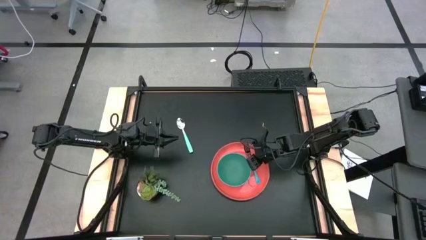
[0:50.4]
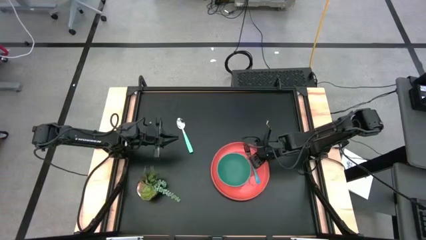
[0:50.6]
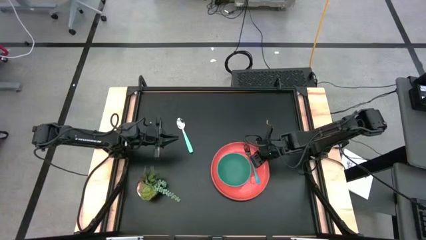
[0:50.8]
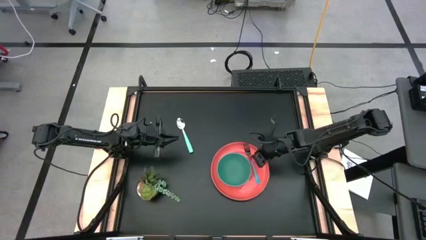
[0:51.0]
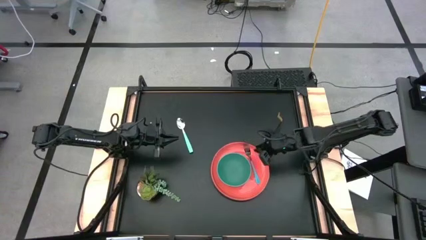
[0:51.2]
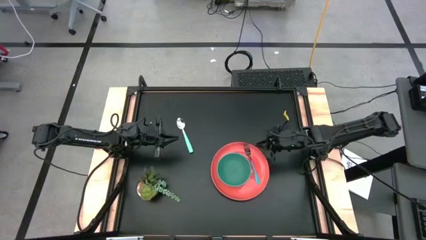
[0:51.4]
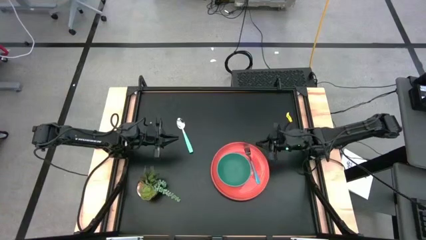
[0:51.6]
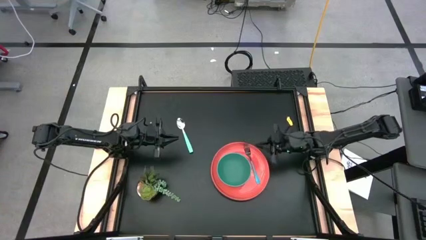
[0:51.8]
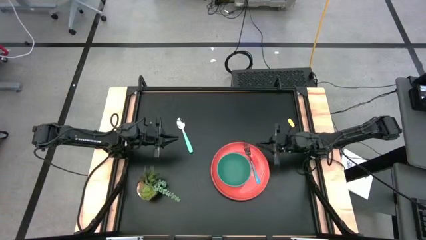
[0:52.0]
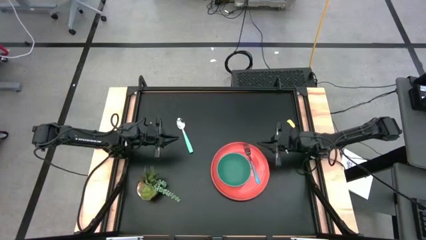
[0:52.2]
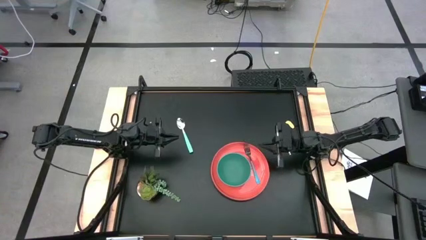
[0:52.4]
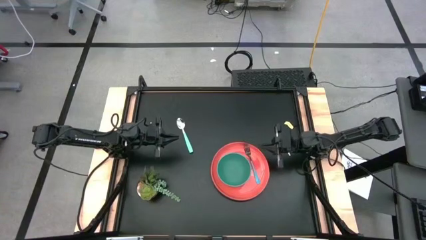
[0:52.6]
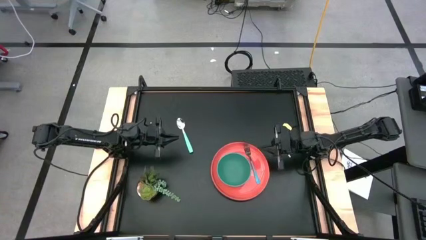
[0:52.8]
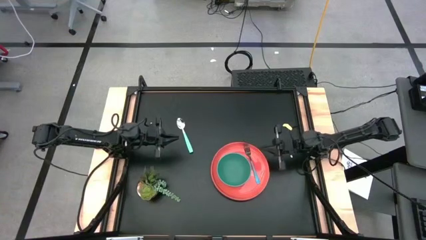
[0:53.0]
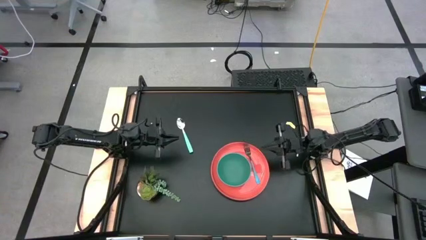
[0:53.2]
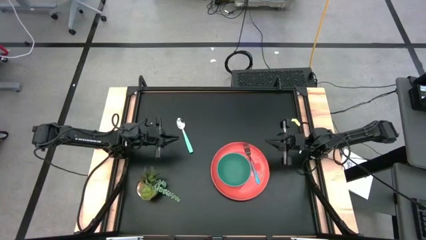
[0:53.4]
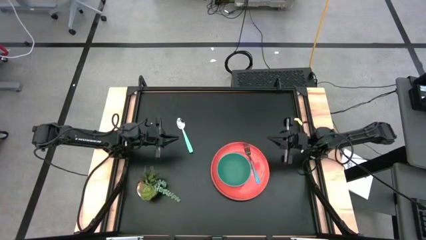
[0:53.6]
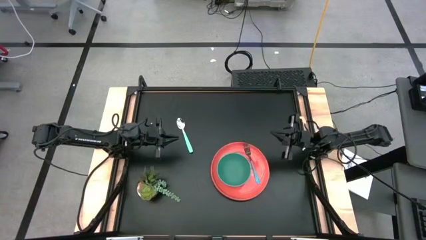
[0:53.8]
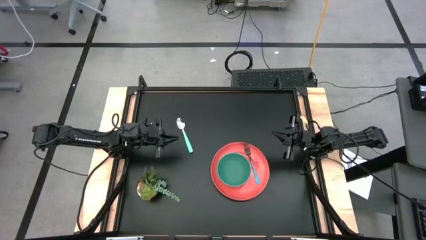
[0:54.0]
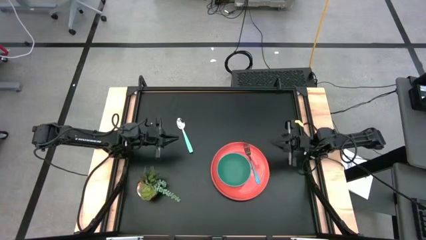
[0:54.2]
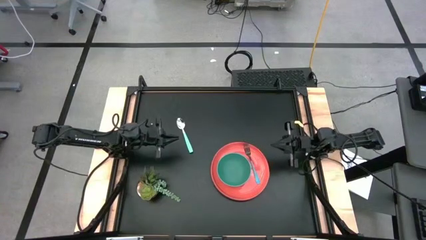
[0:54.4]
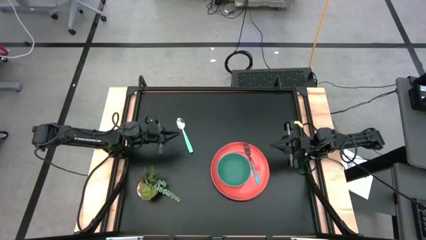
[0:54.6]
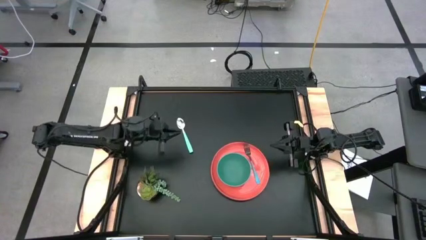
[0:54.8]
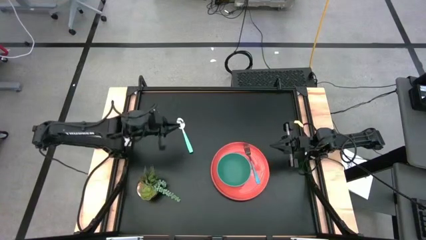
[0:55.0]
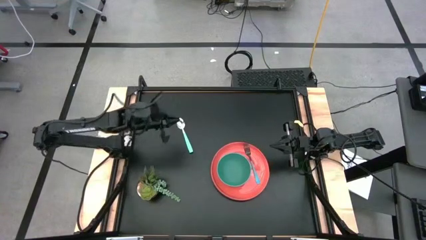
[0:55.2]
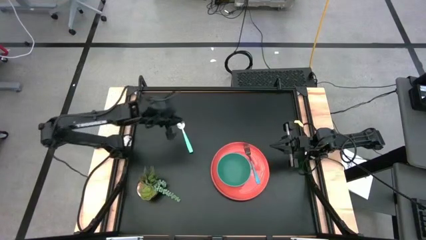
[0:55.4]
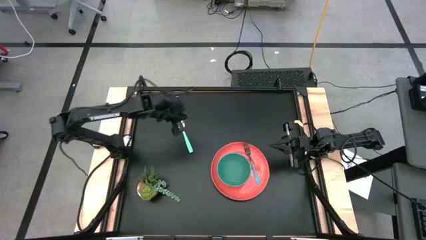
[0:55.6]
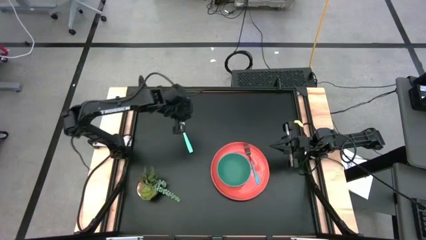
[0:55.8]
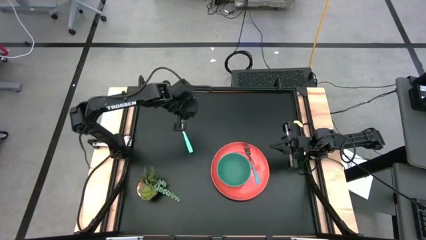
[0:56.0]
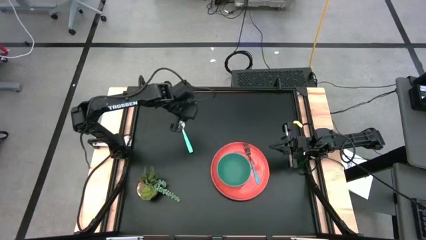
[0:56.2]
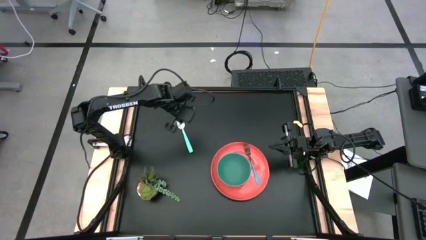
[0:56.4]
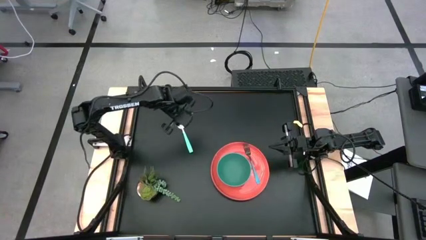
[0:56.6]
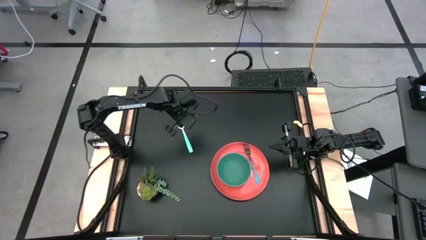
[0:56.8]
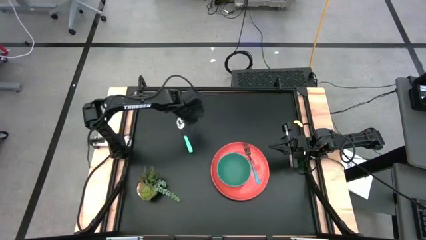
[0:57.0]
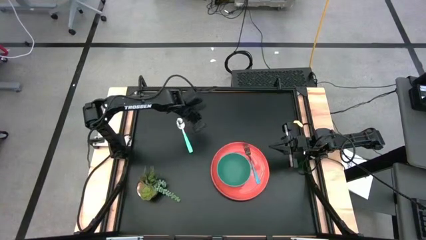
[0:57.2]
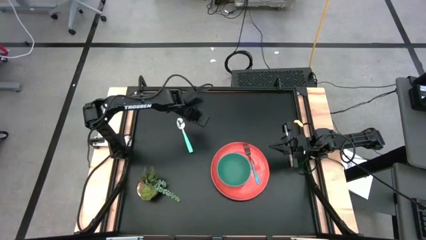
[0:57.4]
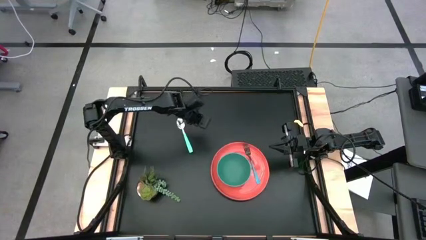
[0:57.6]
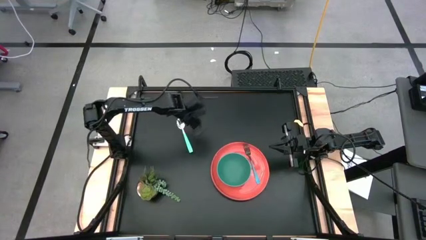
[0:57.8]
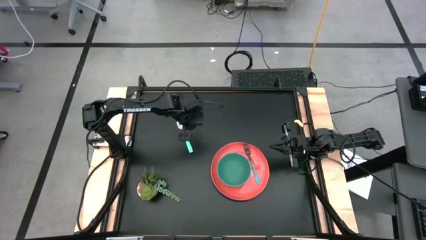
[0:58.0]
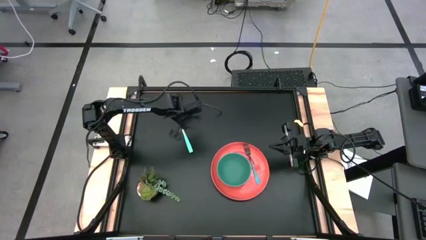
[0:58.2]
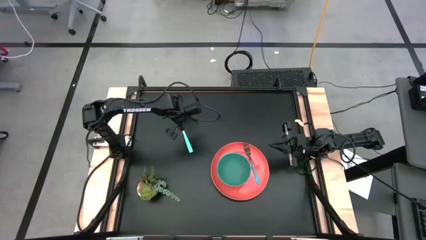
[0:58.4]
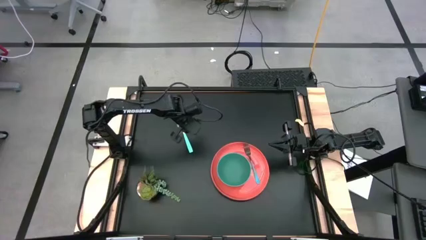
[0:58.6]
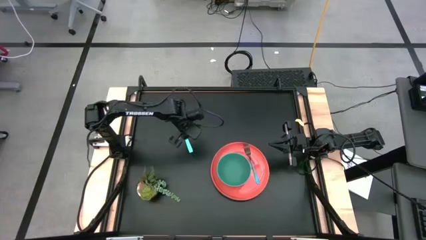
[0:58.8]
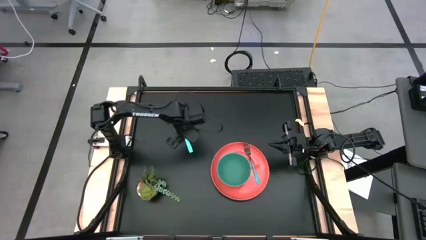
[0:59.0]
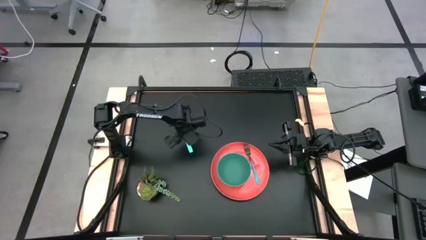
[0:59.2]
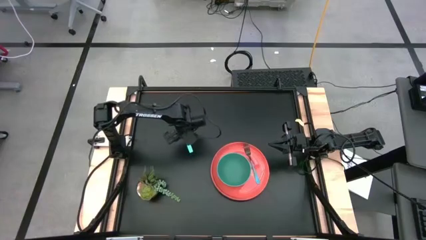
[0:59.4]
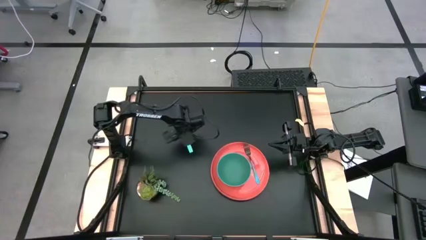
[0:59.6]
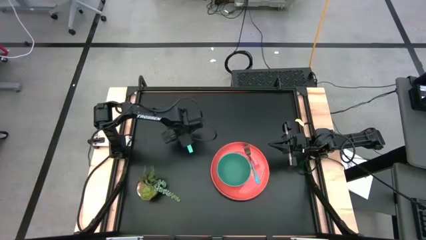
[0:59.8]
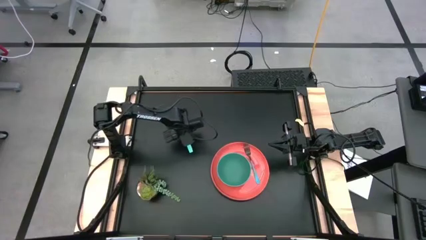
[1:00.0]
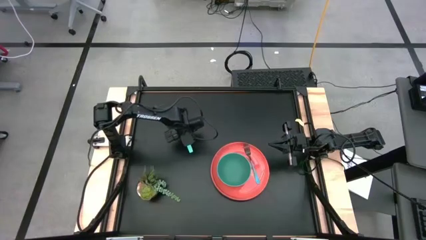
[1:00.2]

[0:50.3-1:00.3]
Task: Pick and place plate/cup/fork/spoon on tray
Put the spoon into the green bowl

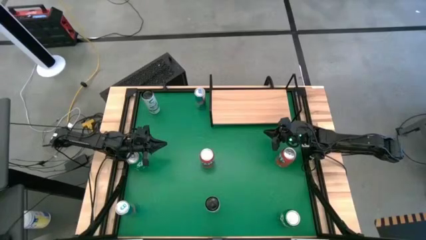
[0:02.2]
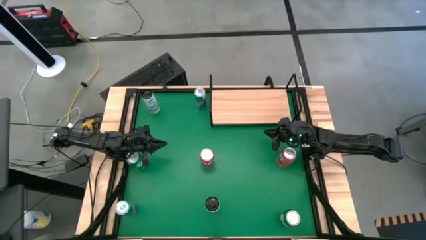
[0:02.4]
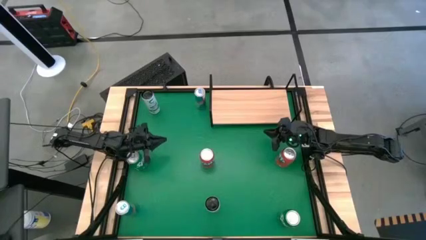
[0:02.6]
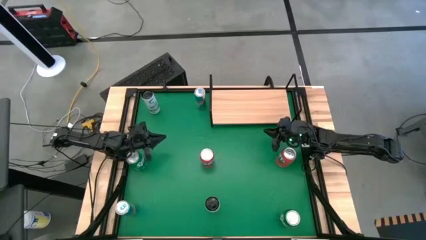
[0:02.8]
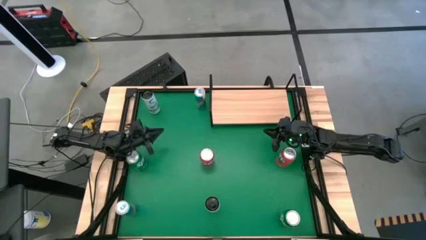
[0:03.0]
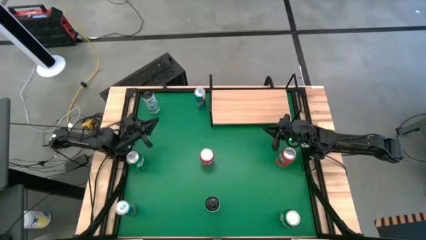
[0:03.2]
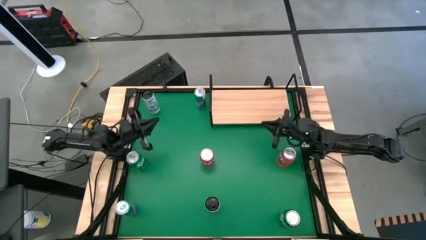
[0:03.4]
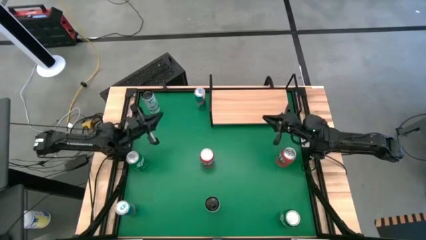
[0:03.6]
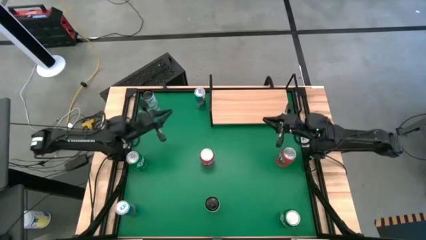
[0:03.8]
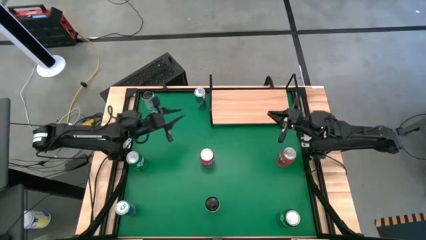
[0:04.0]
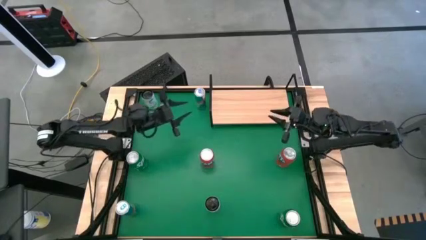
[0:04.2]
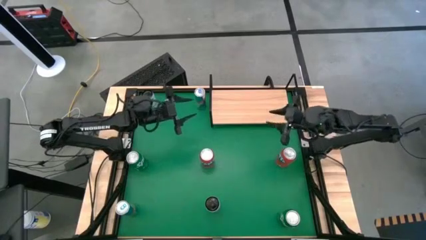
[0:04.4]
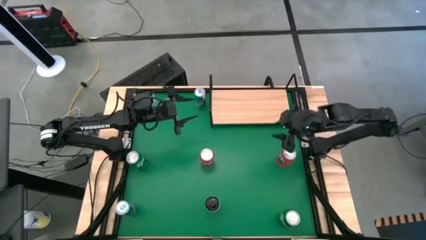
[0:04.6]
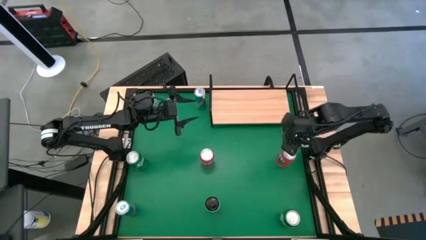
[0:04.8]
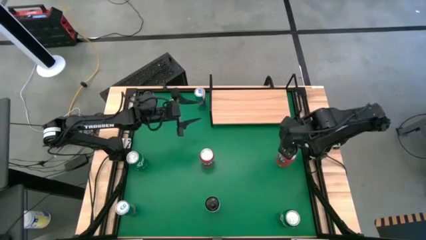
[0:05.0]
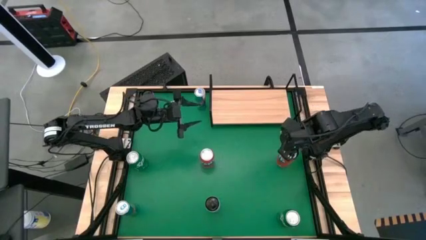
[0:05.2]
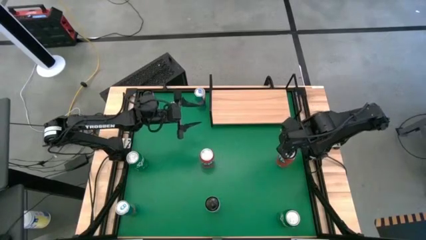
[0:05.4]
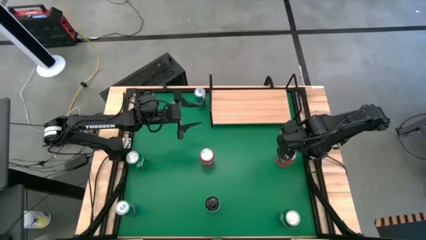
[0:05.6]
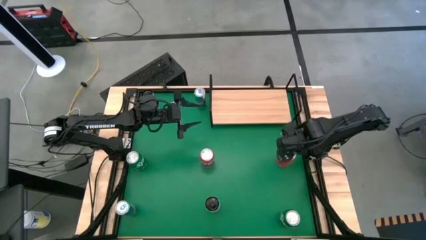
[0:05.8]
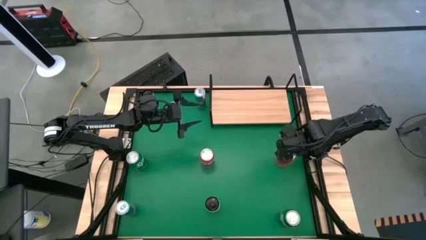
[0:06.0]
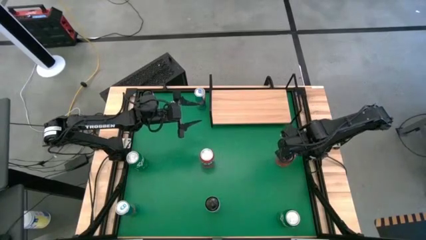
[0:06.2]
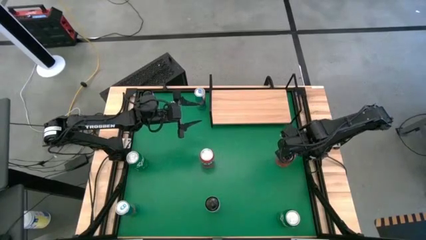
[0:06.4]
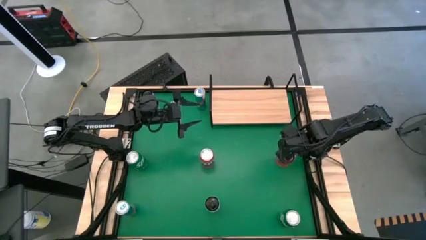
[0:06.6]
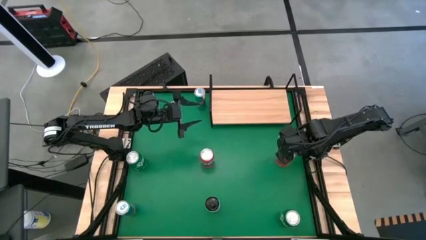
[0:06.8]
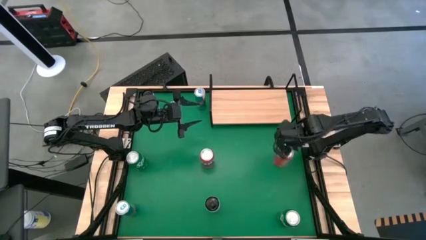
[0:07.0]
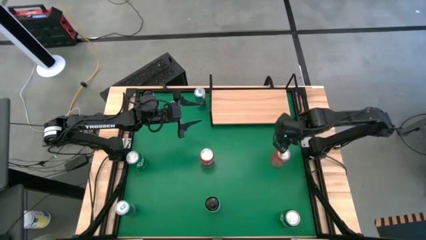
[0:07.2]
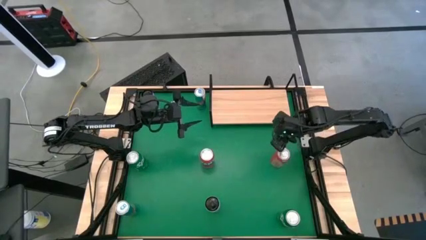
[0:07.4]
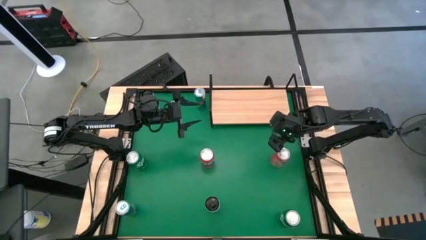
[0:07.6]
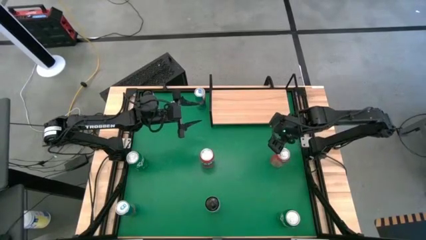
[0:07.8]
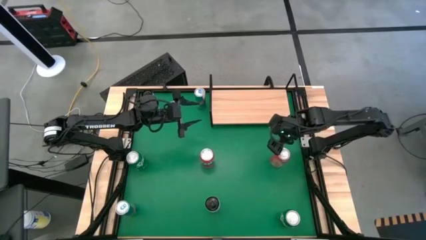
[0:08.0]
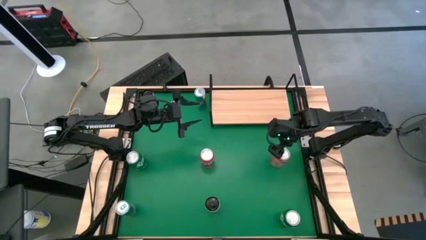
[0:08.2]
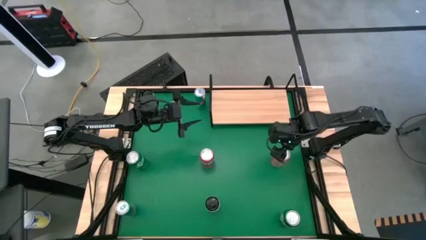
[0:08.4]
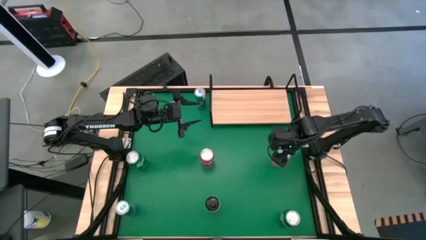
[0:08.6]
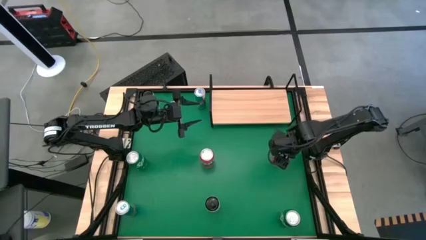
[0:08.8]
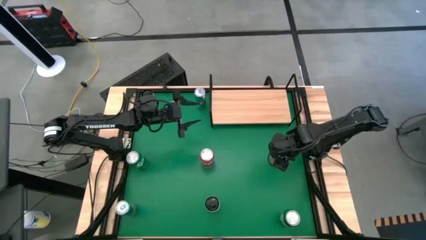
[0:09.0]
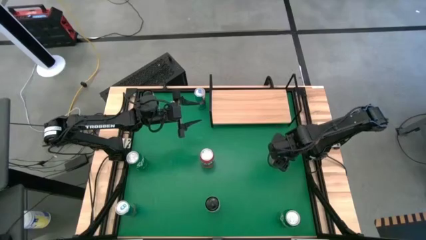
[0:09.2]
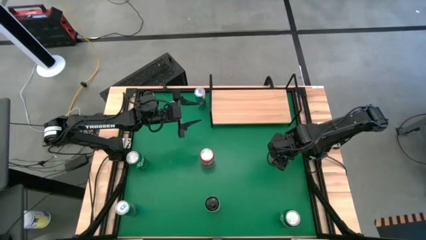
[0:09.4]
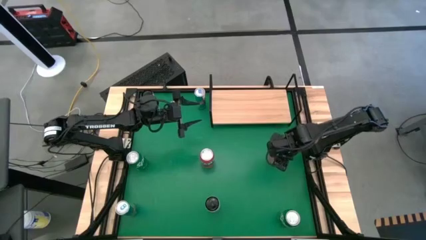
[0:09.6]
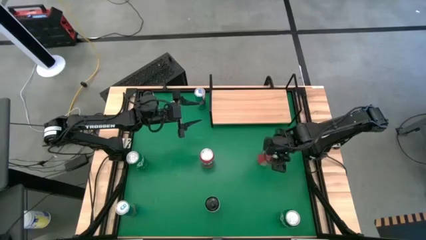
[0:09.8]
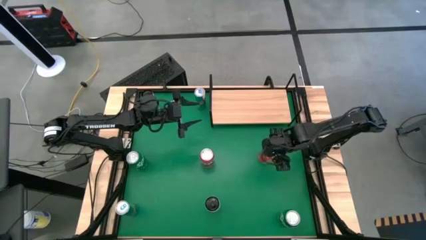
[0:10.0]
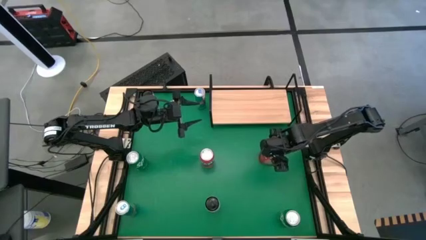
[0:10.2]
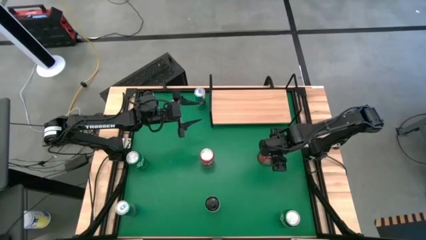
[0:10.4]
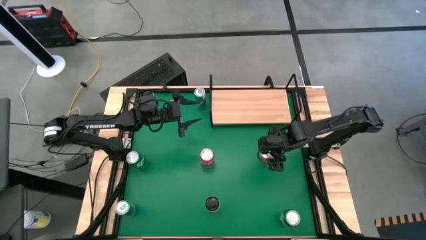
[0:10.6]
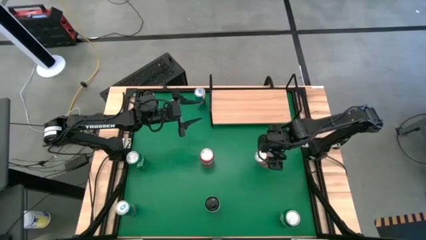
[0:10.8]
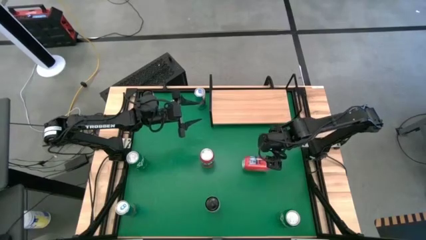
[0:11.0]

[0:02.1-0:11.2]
Task: Place canned beverage on shelf
Put the right red soda can on the shelf
